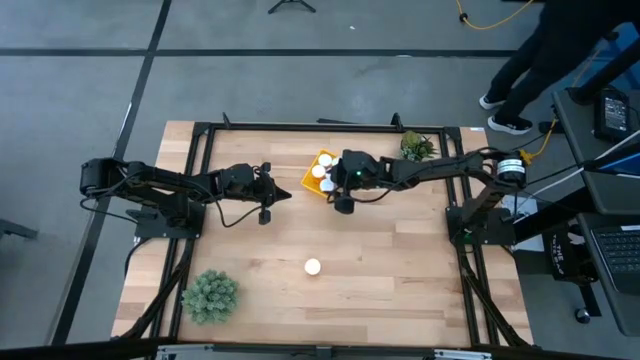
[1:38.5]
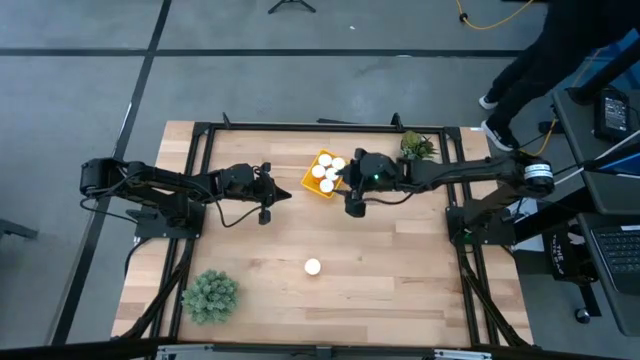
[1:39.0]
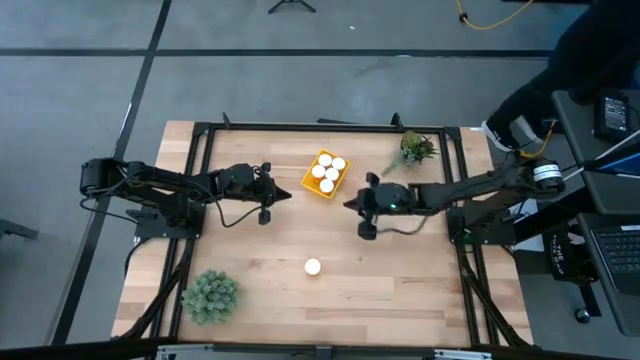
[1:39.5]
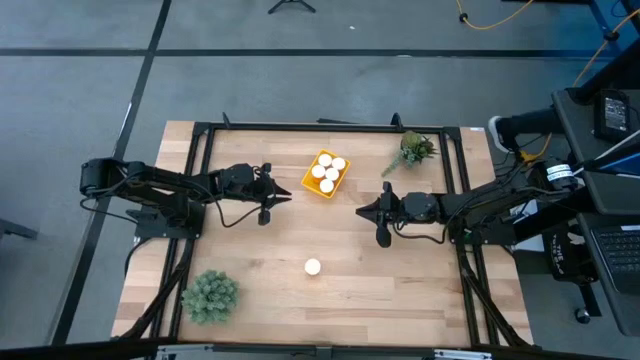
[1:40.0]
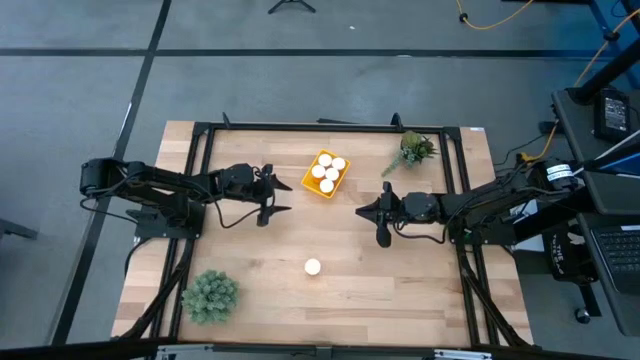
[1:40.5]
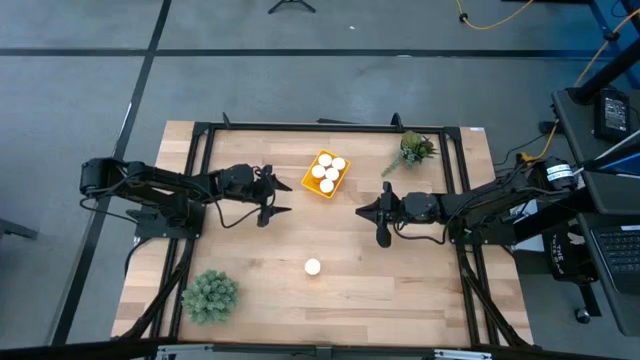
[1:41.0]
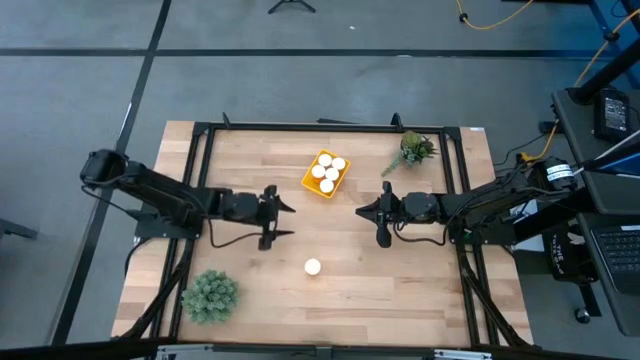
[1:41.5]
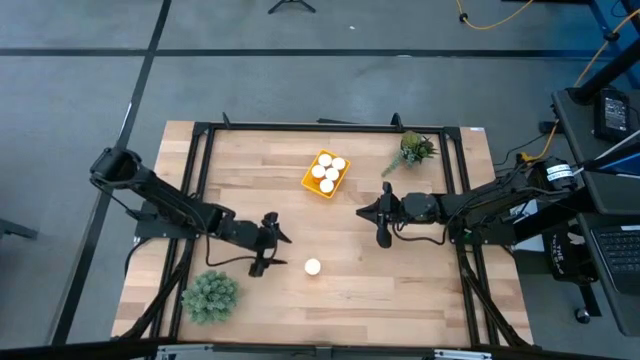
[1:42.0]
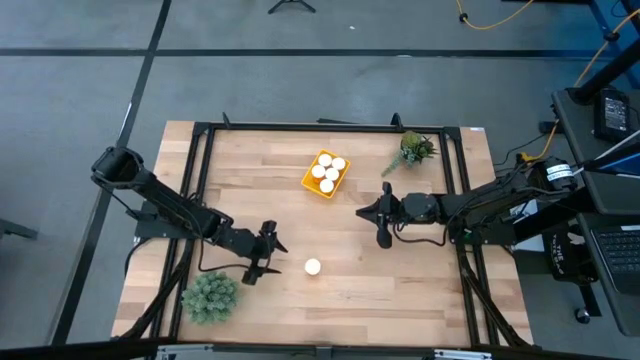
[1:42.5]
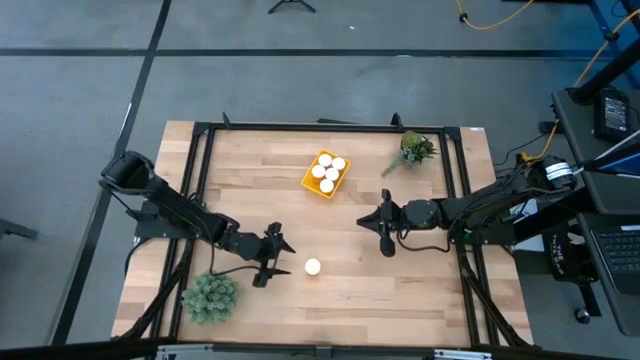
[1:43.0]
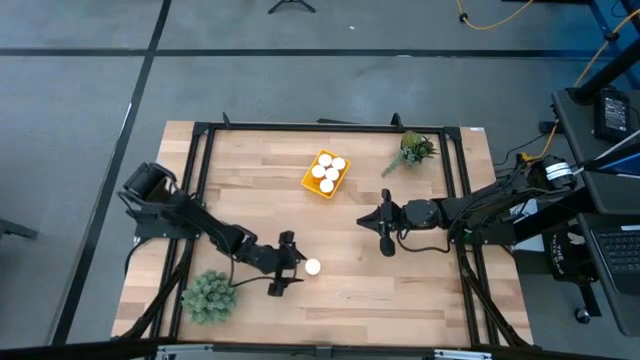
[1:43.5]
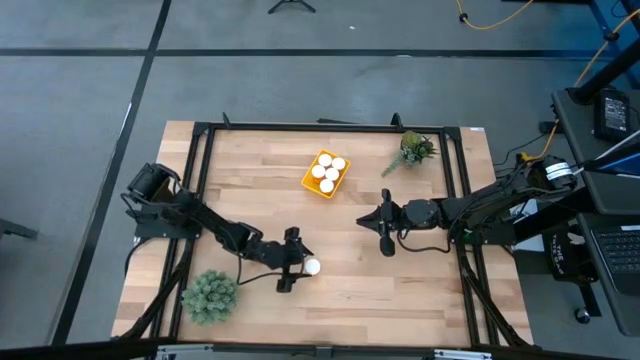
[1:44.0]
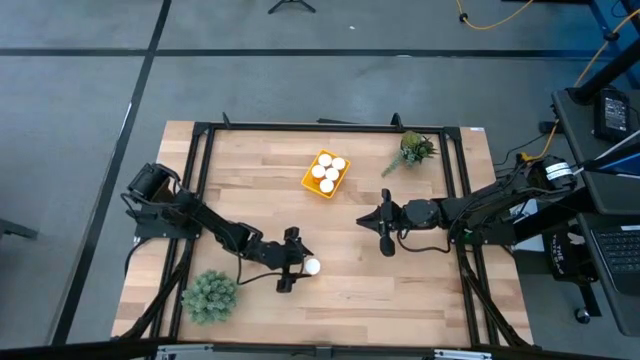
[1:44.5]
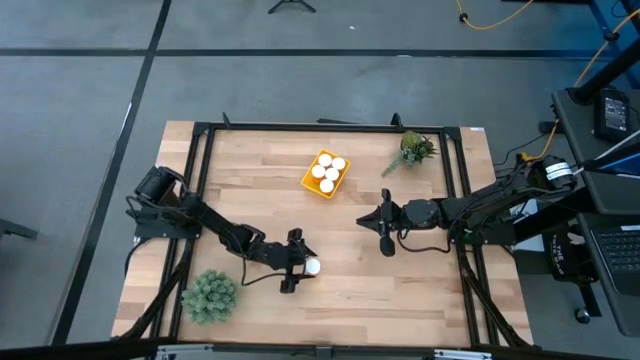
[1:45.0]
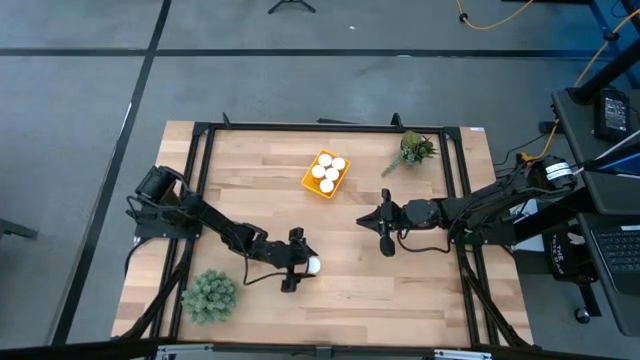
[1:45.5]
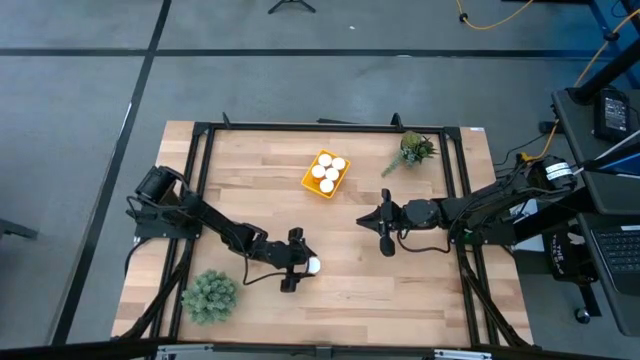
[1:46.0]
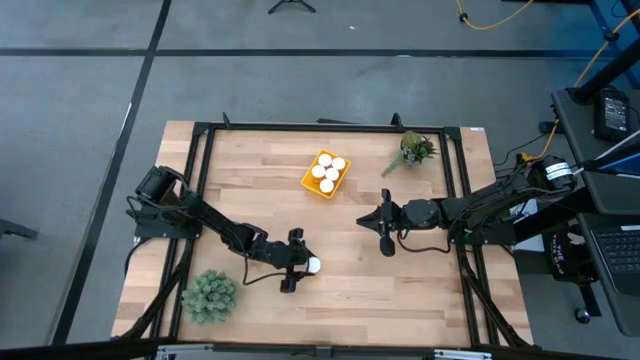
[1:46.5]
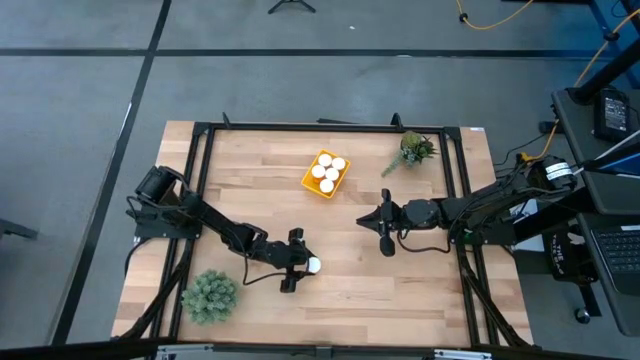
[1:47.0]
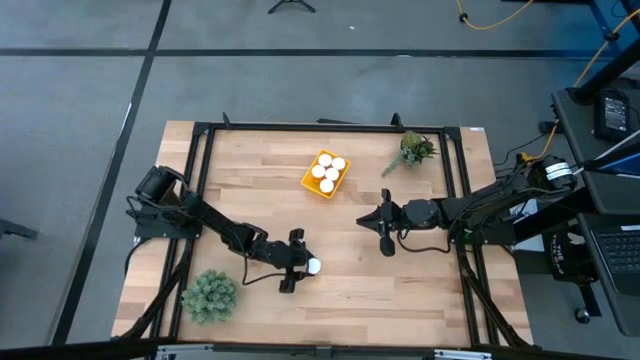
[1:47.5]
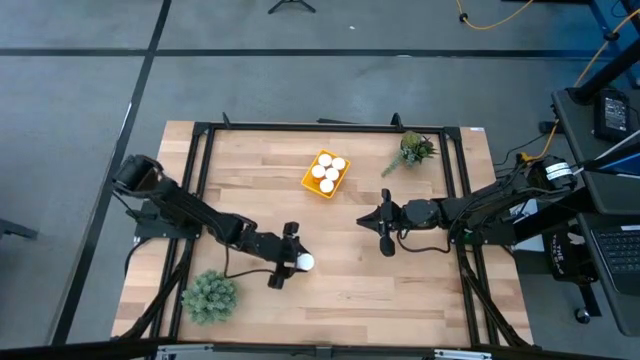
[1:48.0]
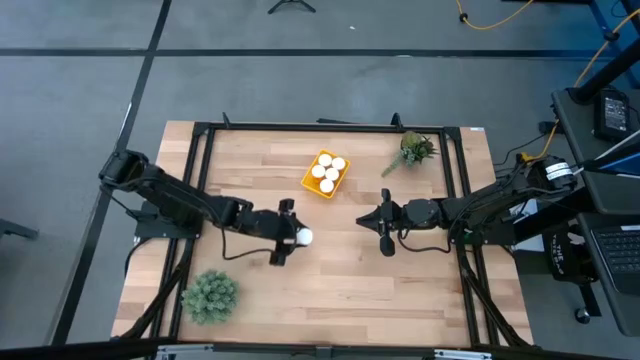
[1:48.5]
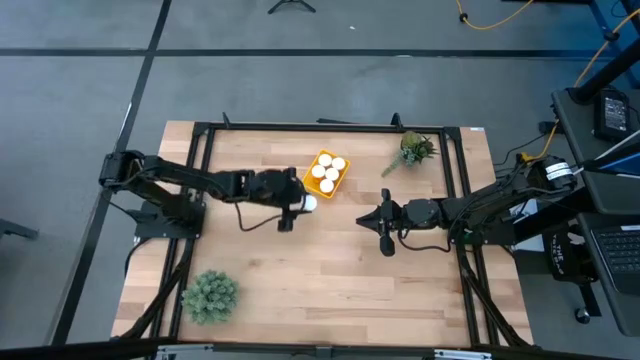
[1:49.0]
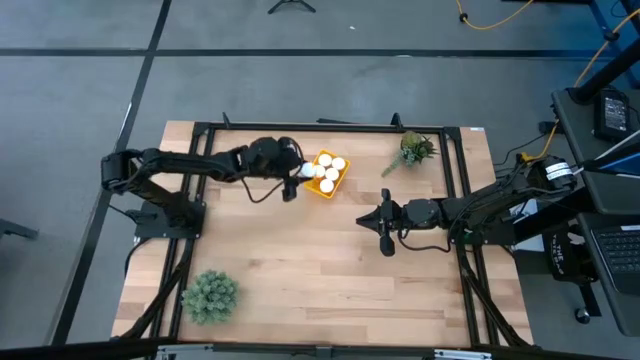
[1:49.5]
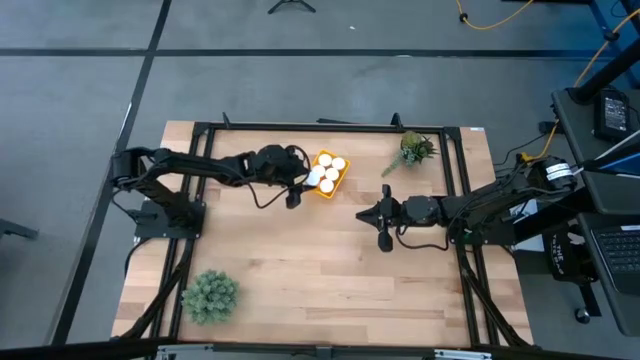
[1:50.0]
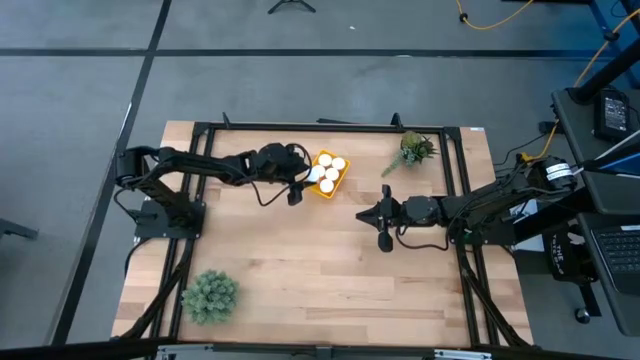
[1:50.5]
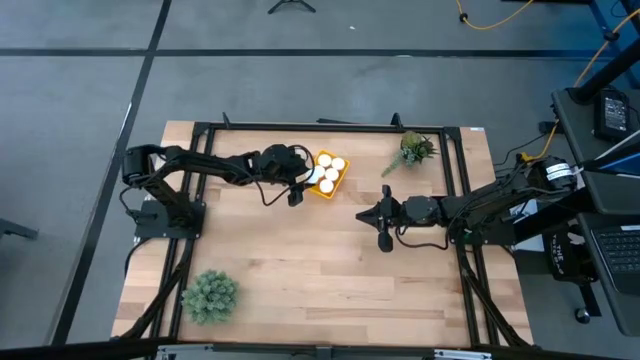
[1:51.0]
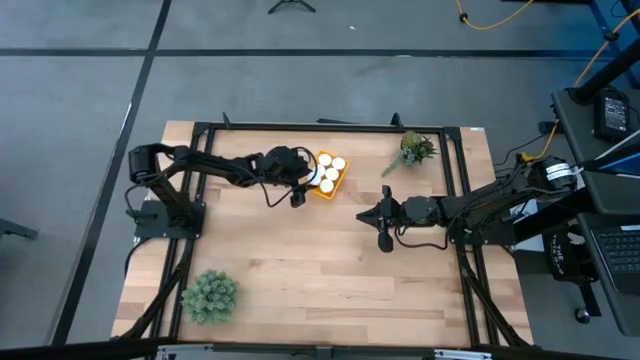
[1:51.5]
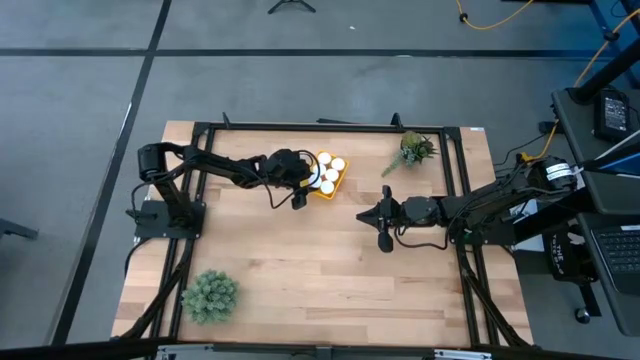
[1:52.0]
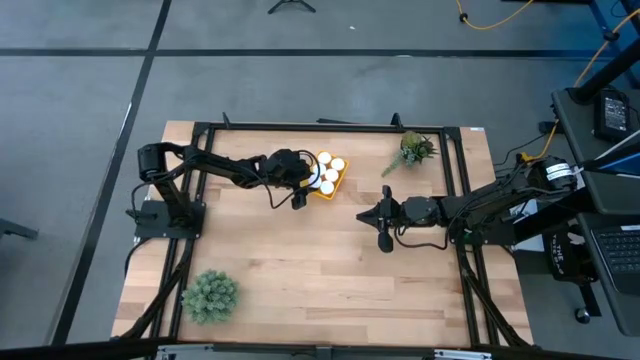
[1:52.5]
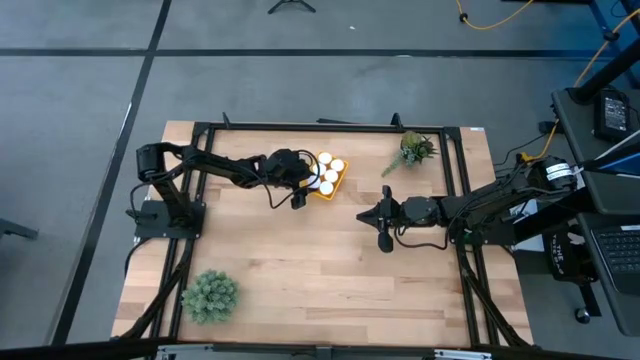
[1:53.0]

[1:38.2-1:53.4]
Task: Pick and place pill bottles into a basket
Put the pill bottle into the bin

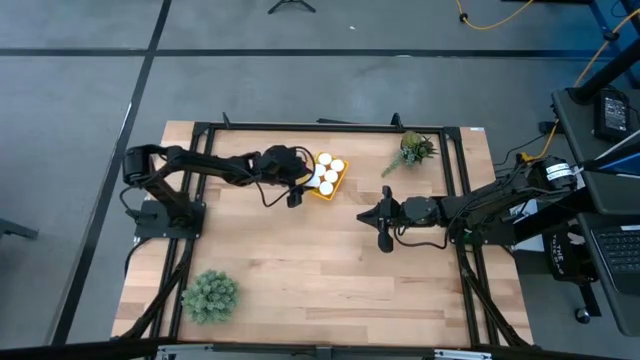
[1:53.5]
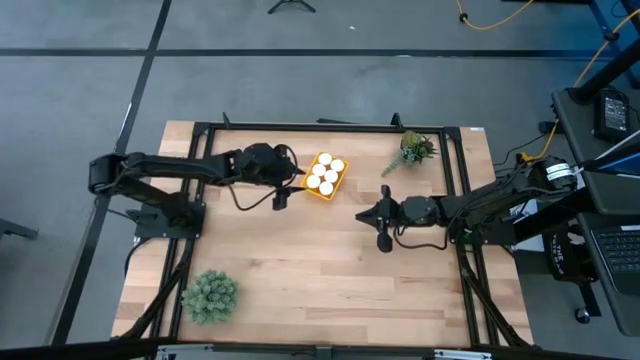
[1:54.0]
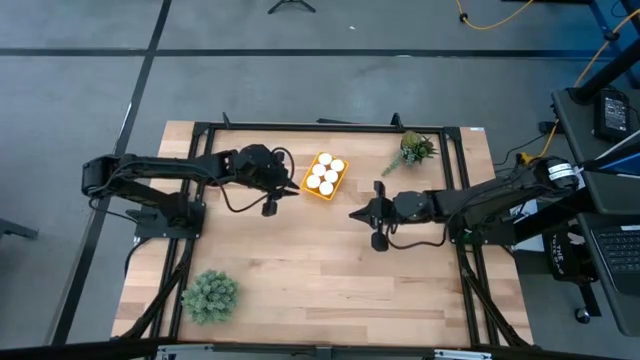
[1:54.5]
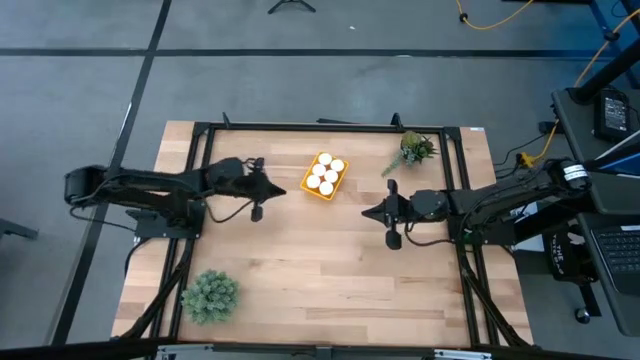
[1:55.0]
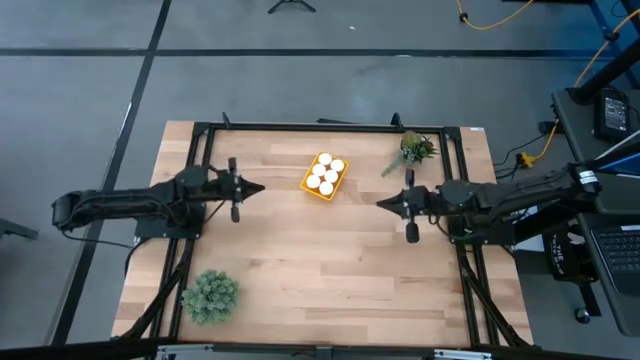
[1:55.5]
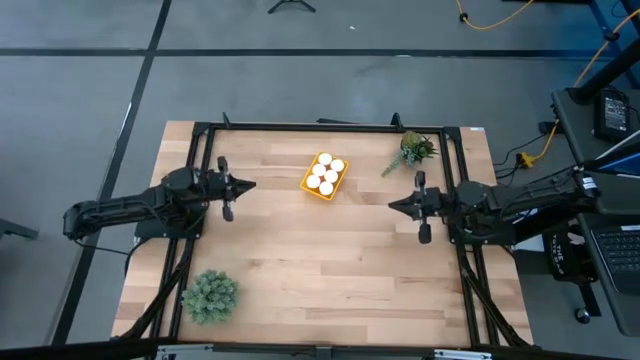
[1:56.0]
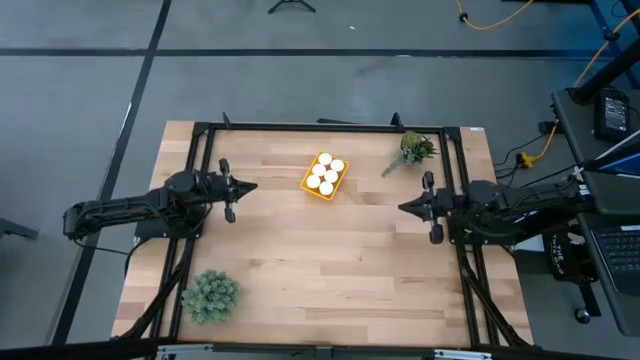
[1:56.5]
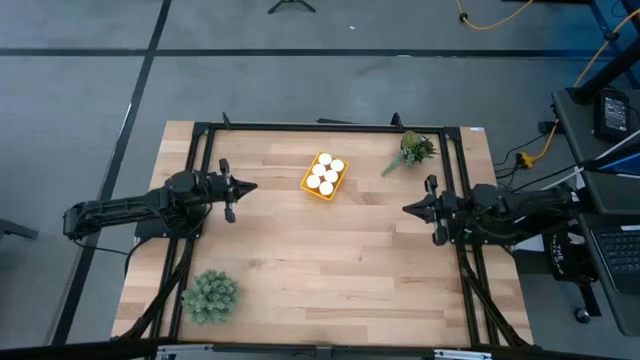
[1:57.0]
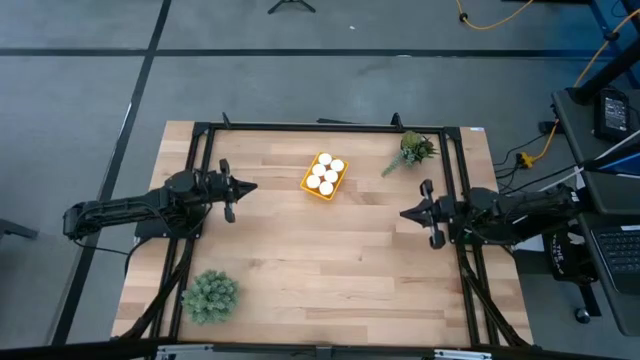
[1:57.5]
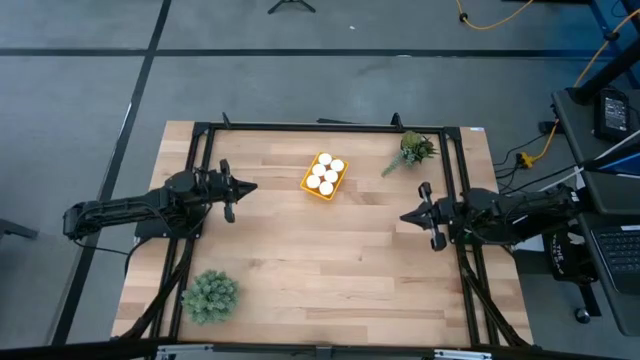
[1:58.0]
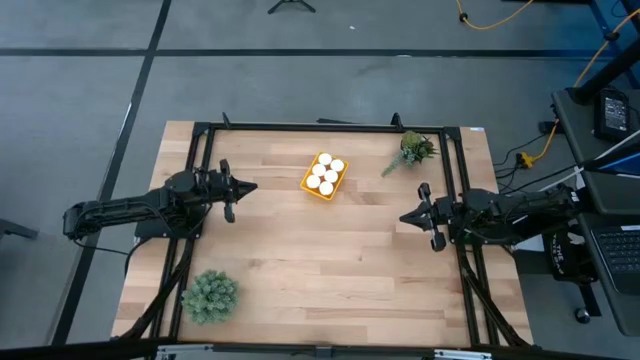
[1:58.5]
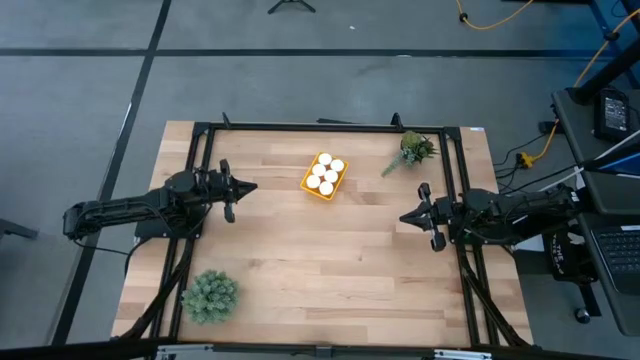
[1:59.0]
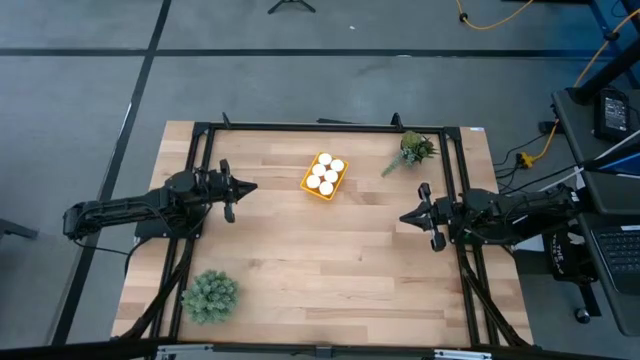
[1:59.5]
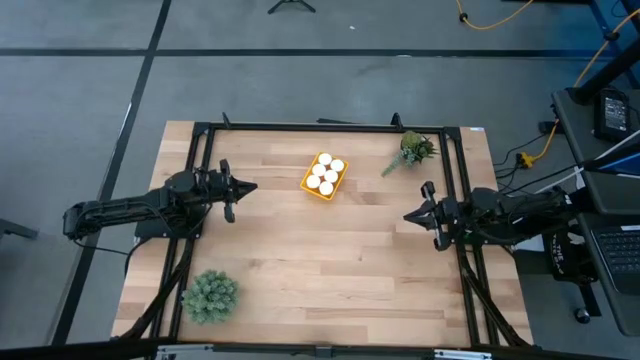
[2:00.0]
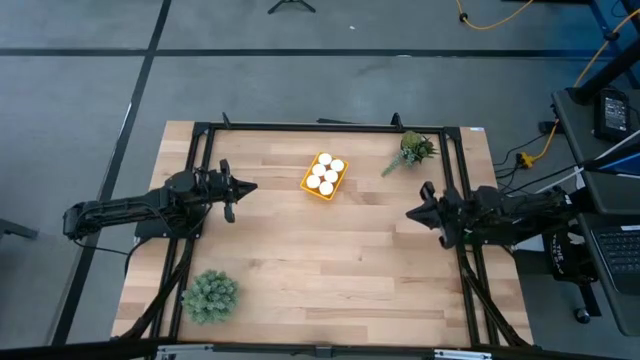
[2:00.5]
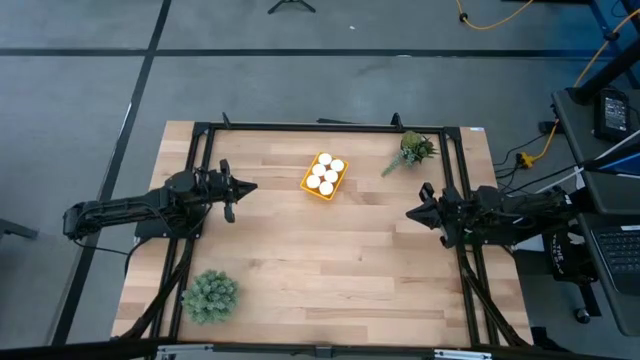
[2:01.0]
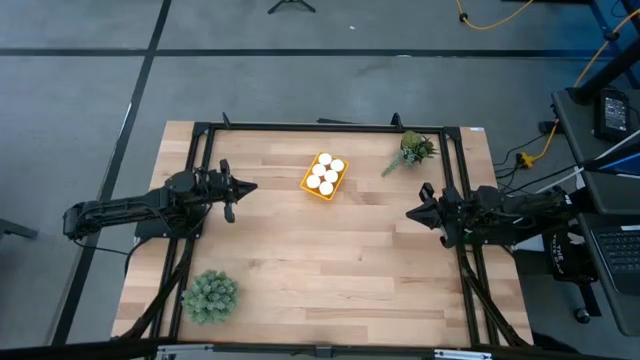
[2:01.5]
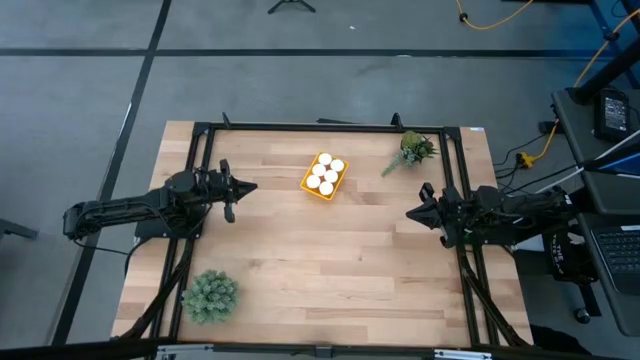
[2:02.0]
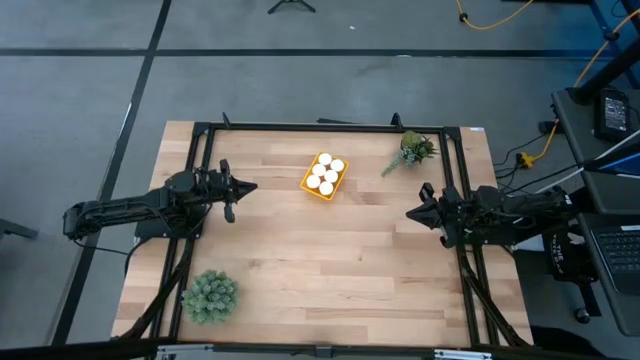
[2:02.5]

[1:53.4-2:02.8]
Return to Home Position
